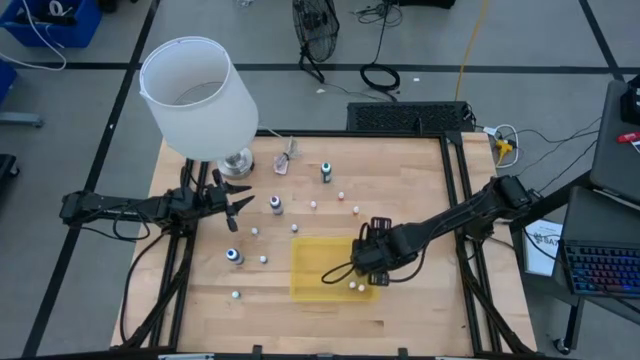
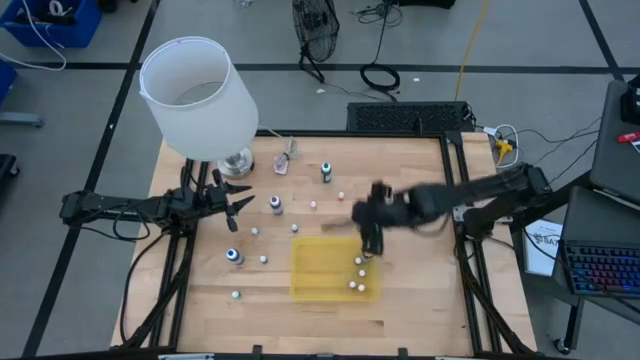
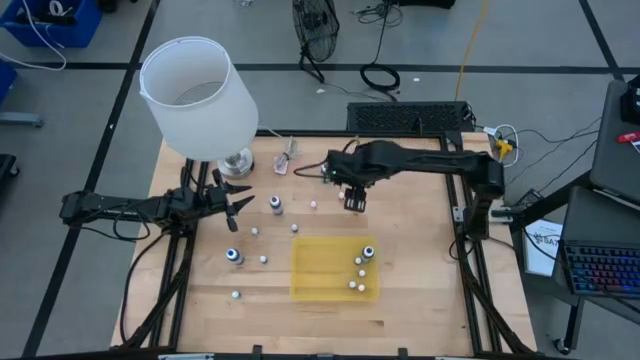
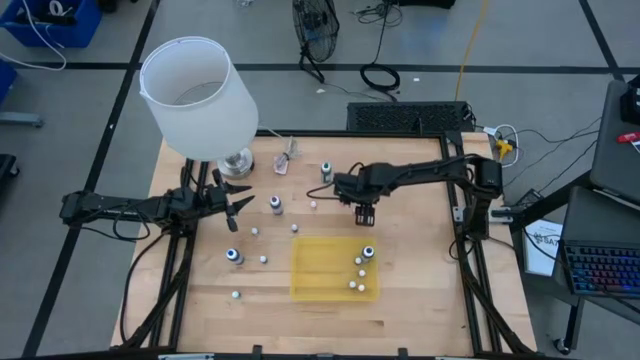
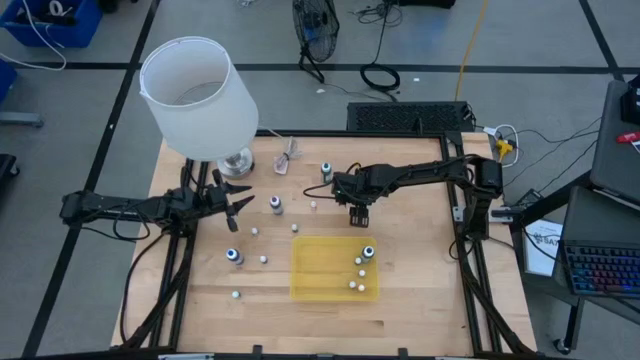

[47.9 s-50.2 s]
Task: Pick & Place food coloring
Put the small orange food coloring bottle into the yellow container

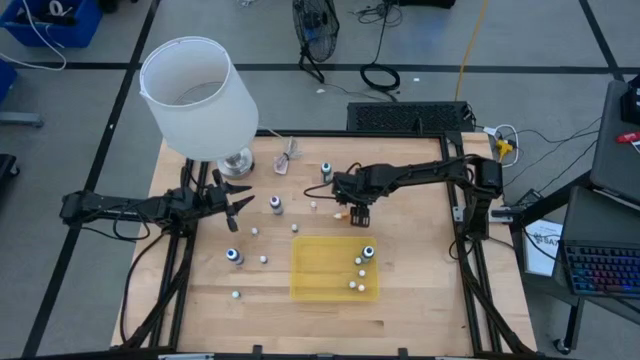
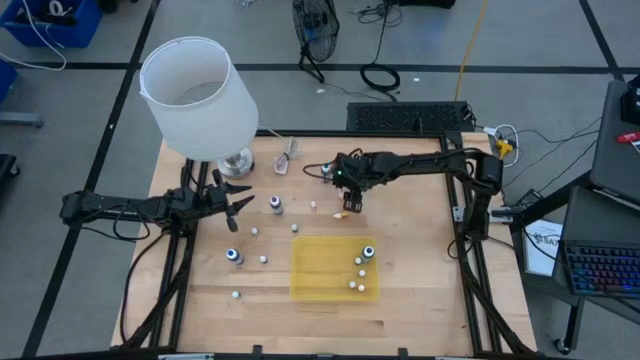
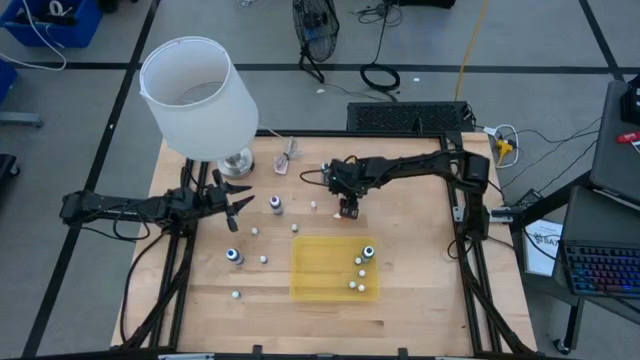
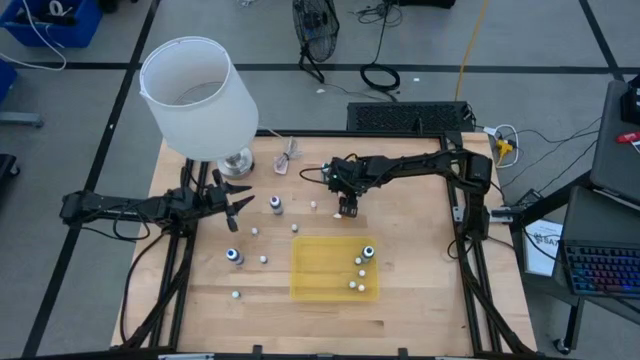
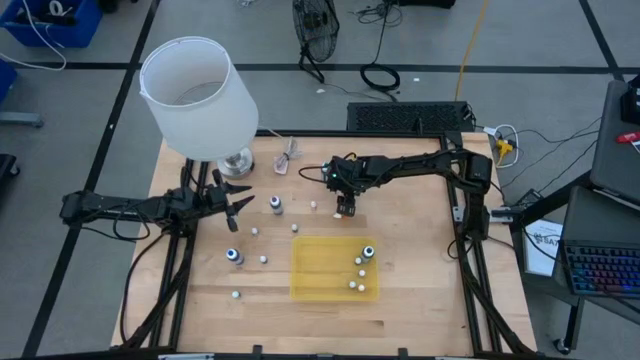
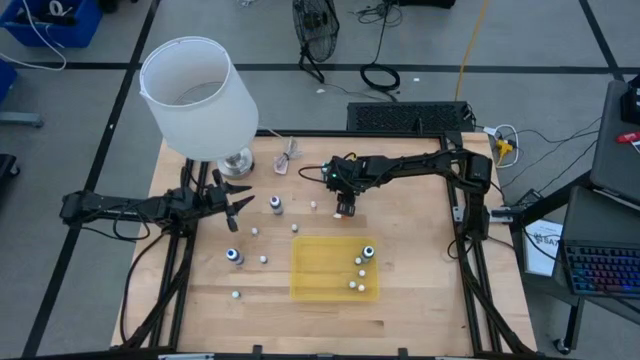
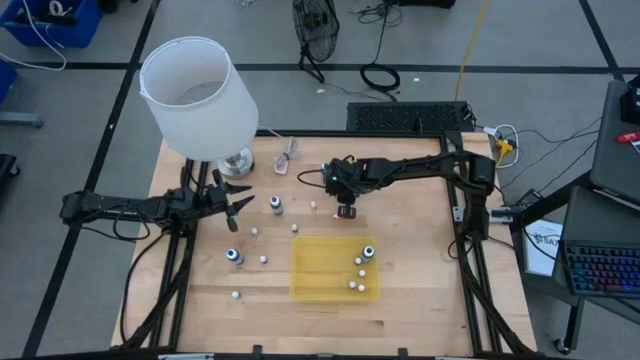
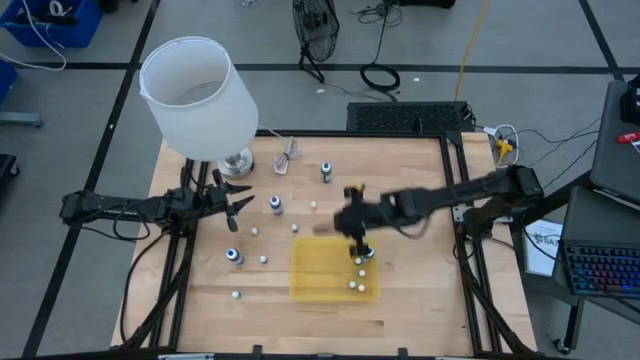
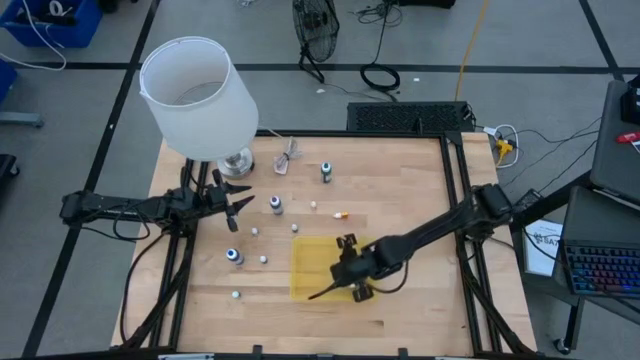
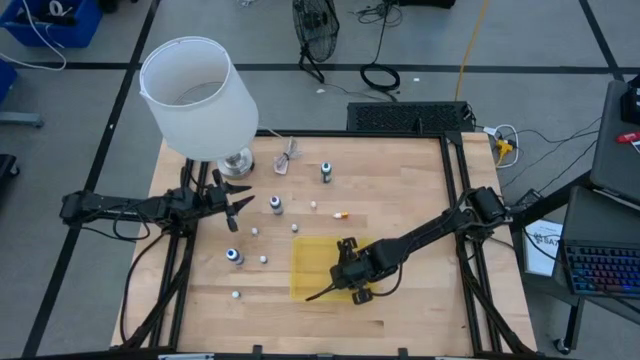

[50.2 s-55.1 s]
Put the small orange food coloring bottle into the yellow container

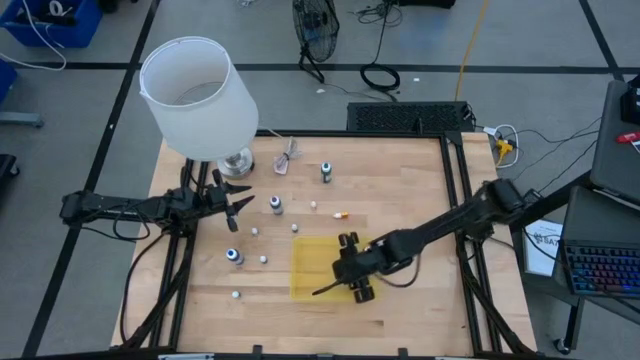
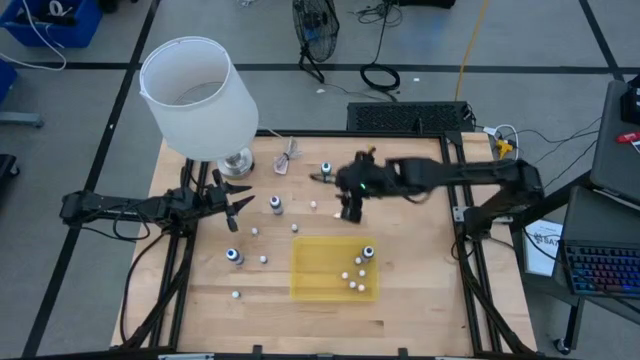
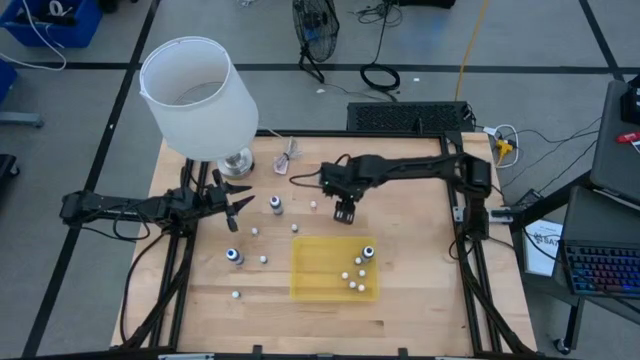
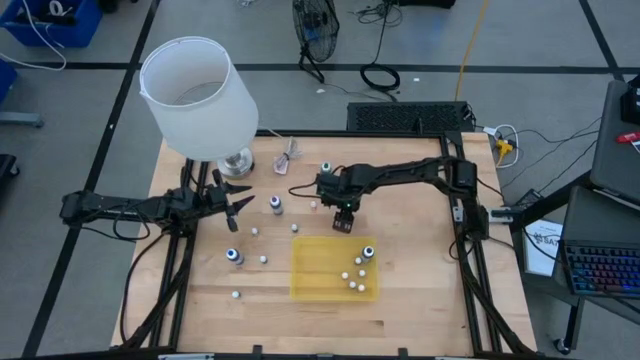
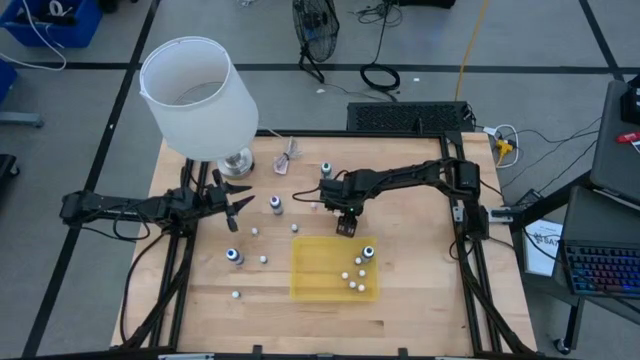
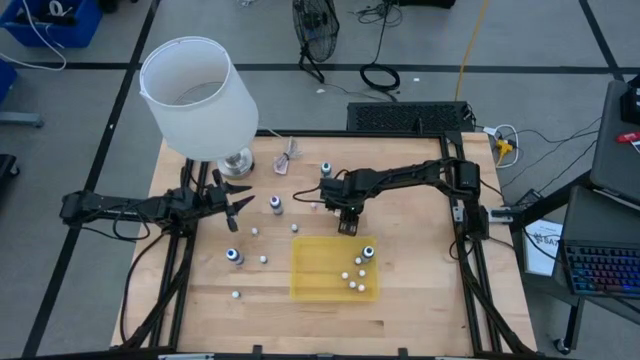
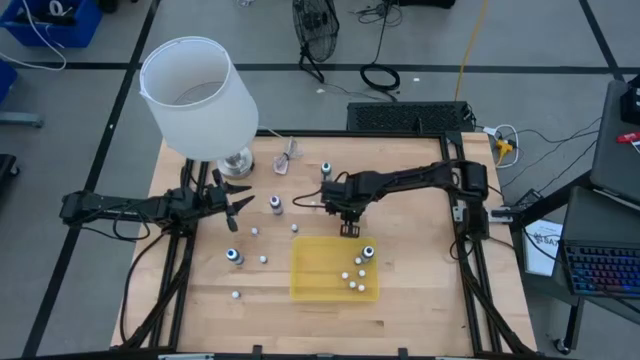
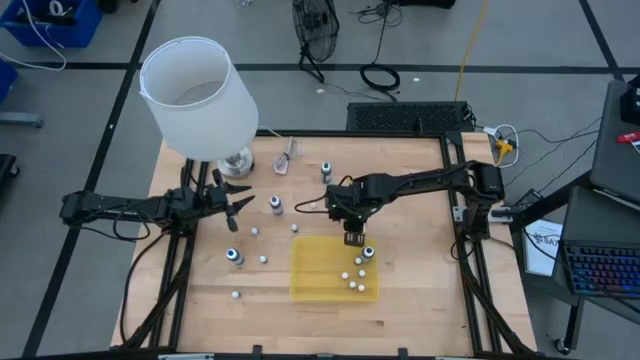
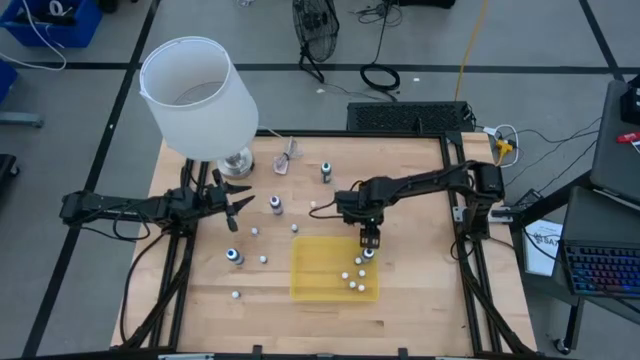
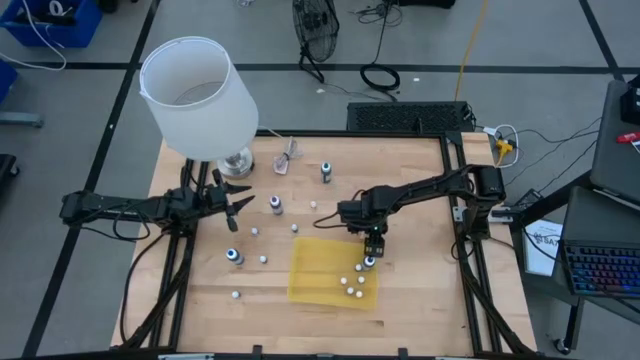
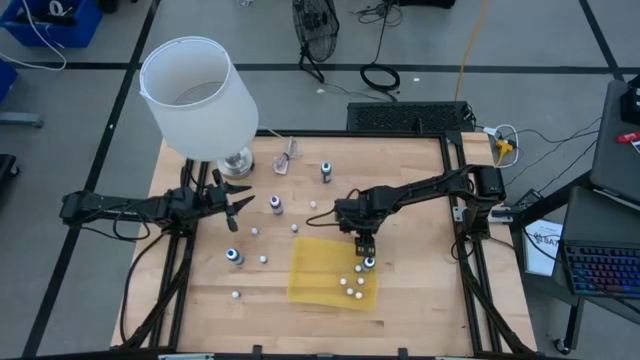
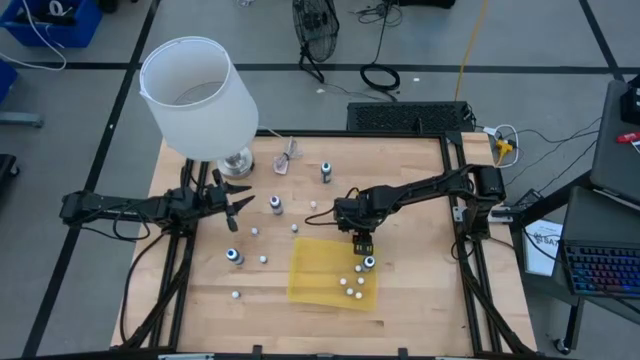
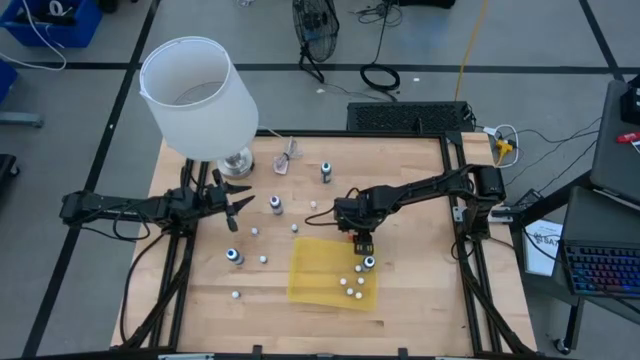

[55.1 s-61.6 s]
Put the small orange food coloring bottle into the yellow container

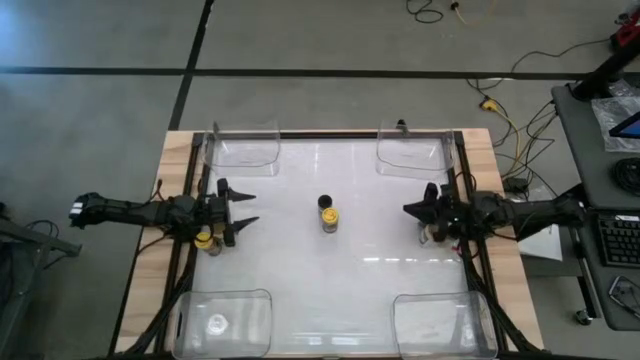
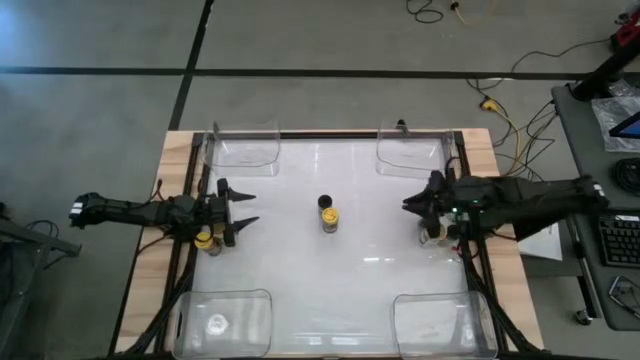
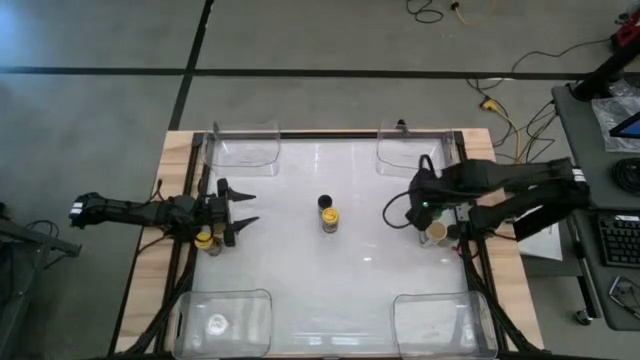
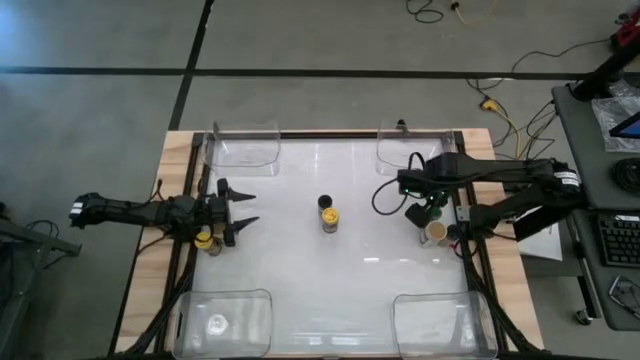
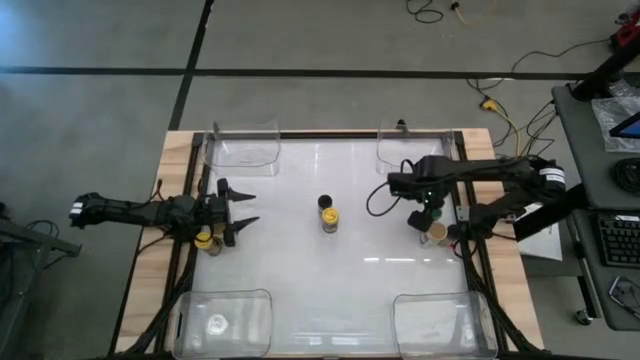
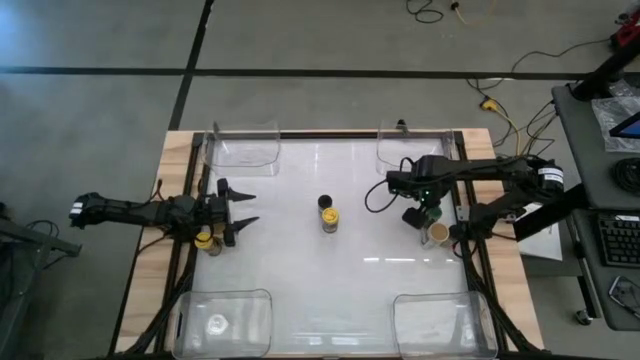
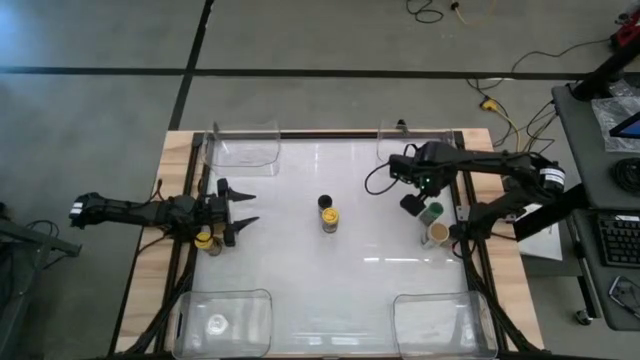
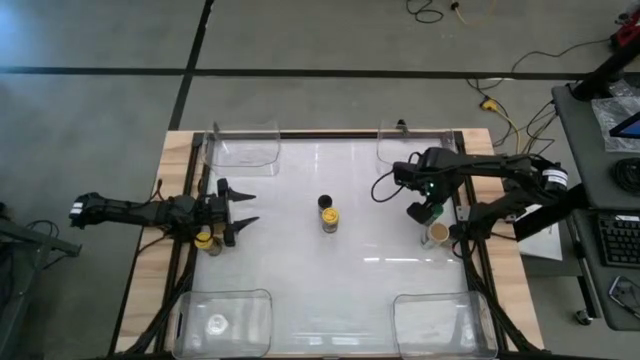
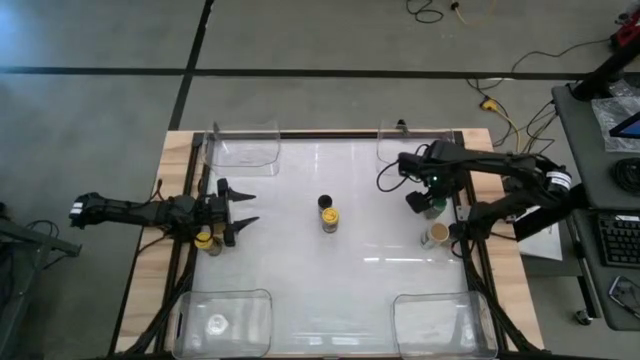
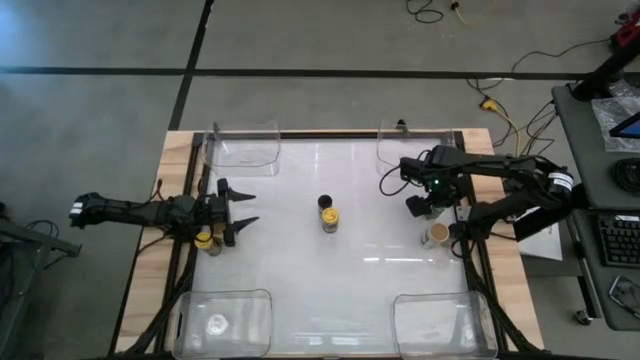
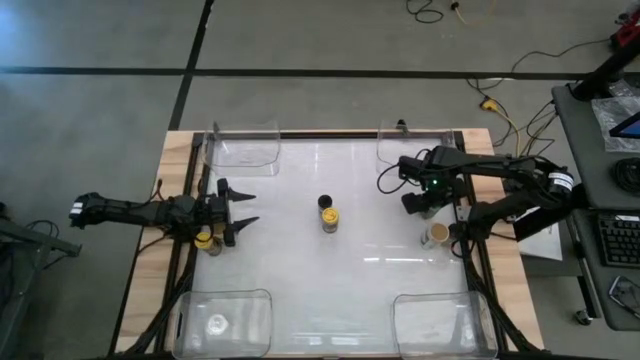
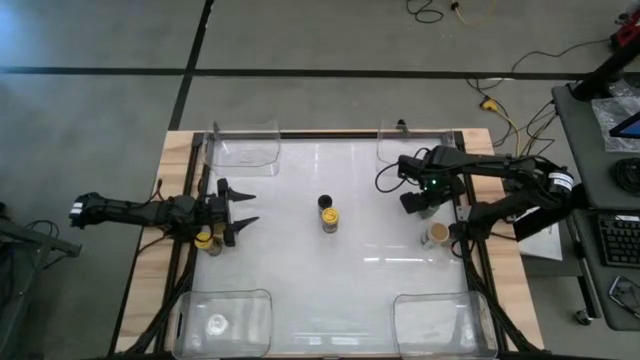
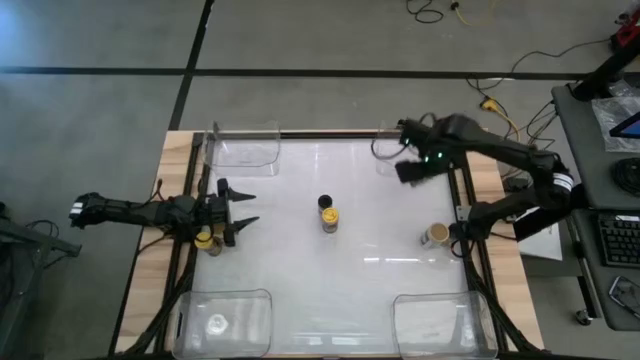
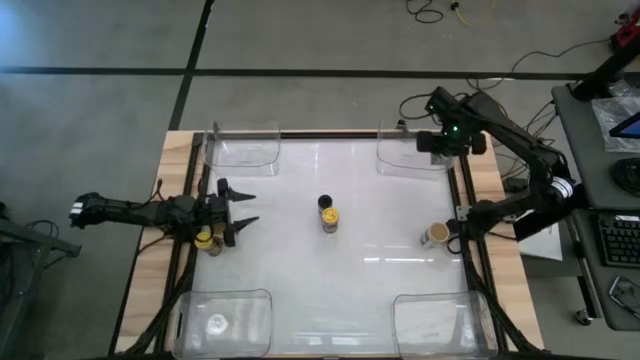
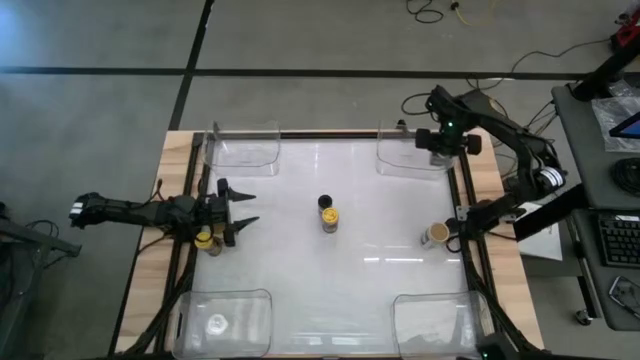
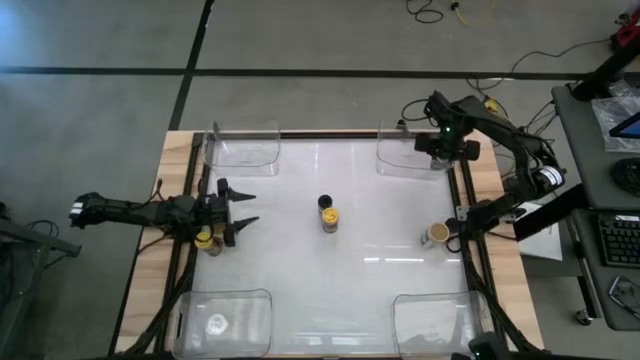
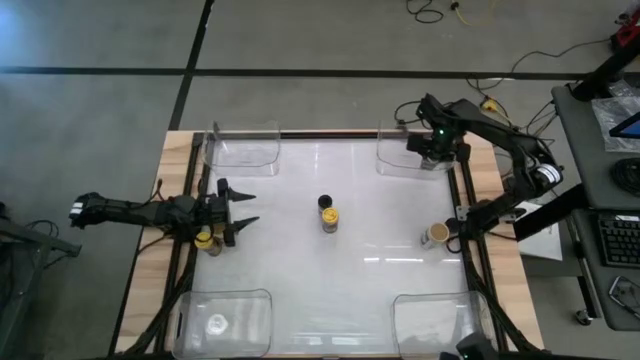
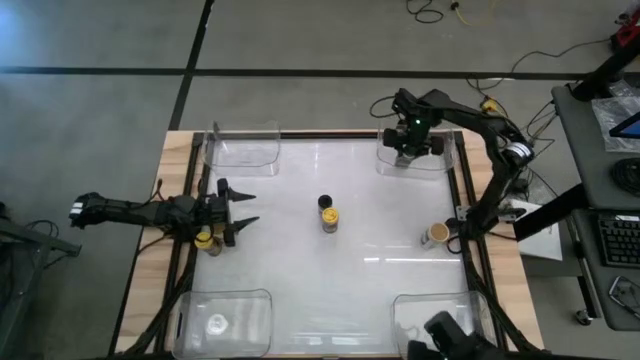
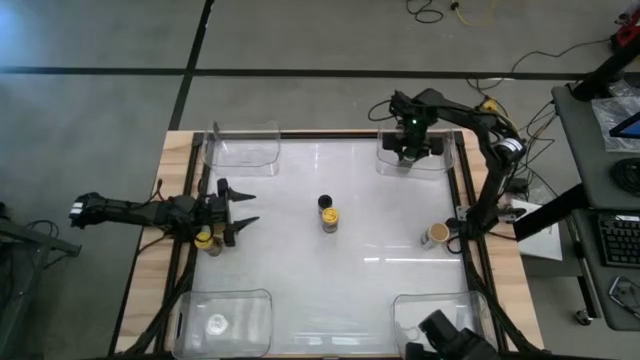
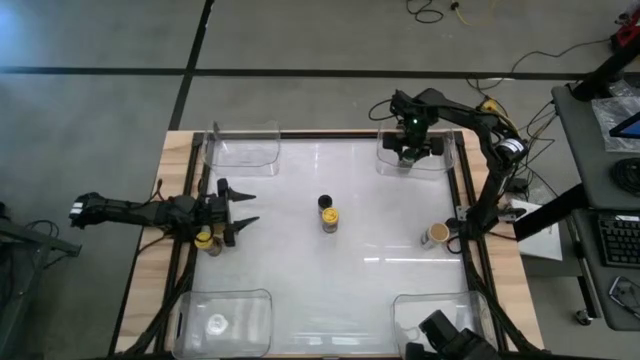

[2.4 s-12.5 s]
Task: Sort spices by type
Put the right green seasoning bottle into the top right transparent bin
